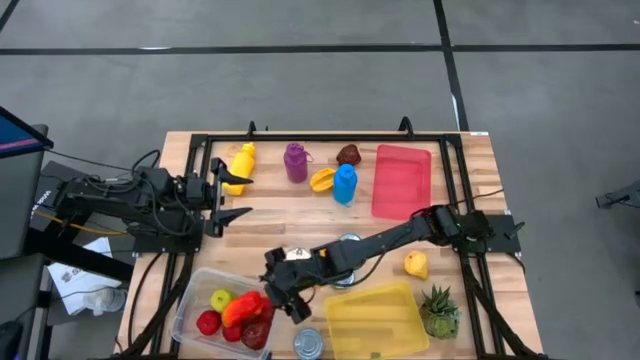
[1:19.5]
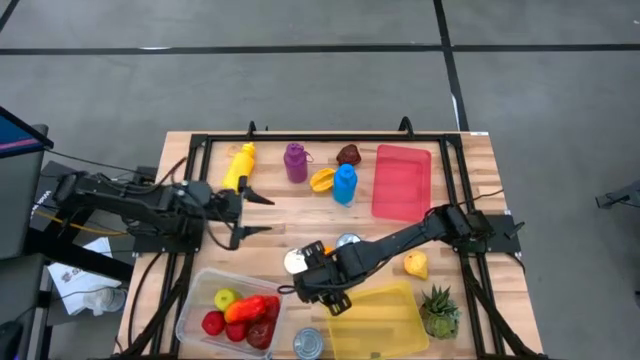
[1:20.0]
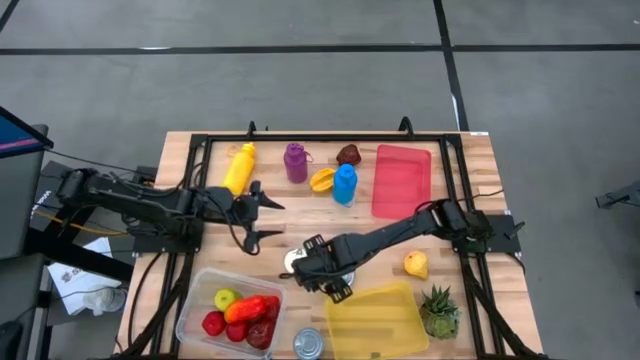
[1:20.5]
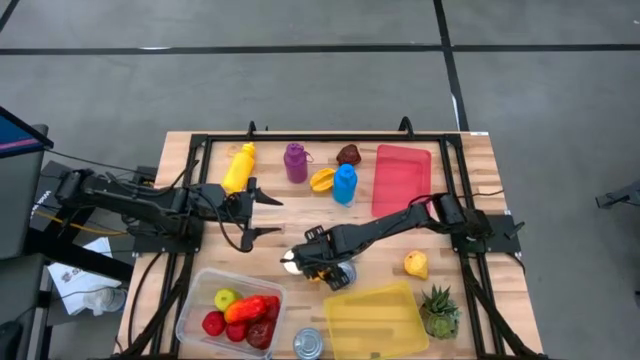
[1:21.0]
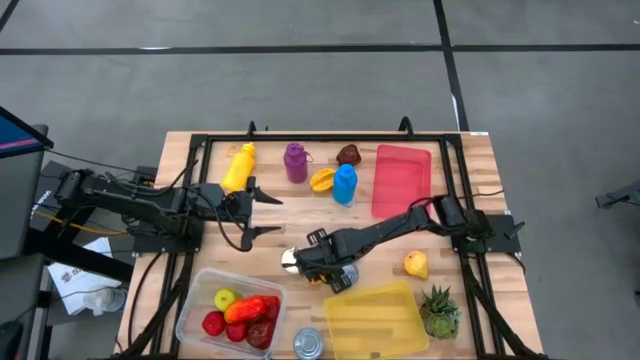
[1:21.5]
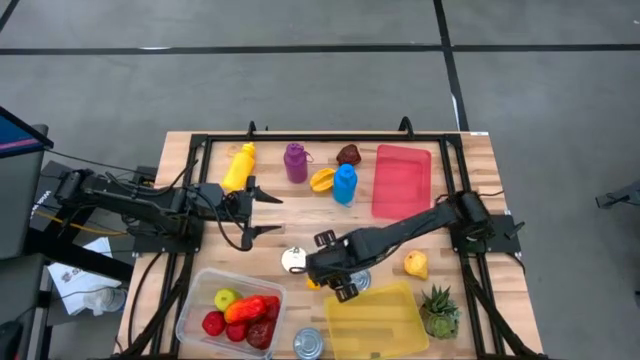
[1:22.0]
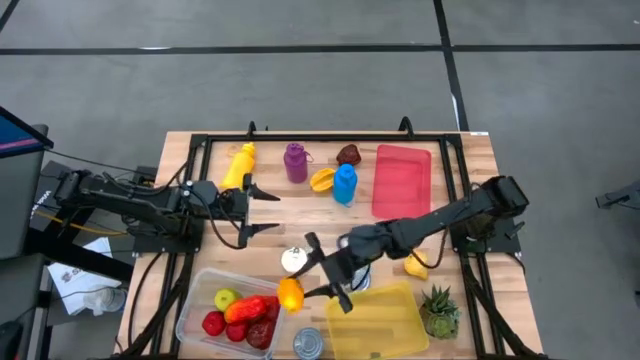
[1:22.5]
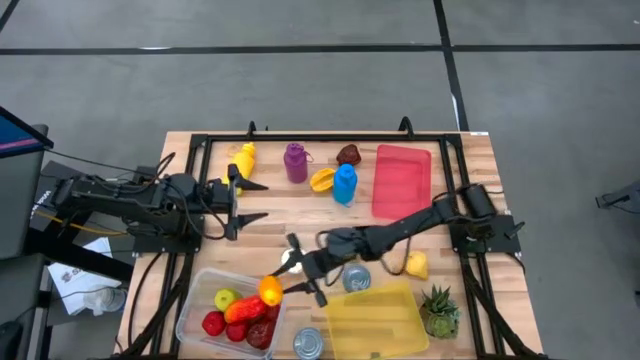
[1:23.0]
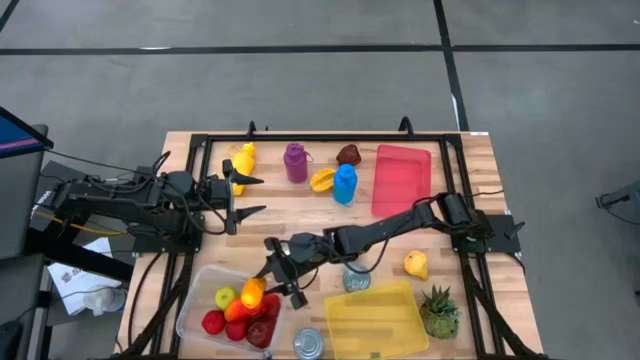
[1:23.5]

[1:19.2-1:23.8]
Task: Pick & Place Food Item
Put the yellow mango into the transparent bin

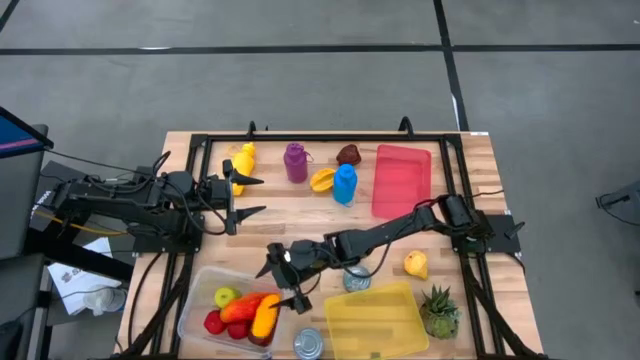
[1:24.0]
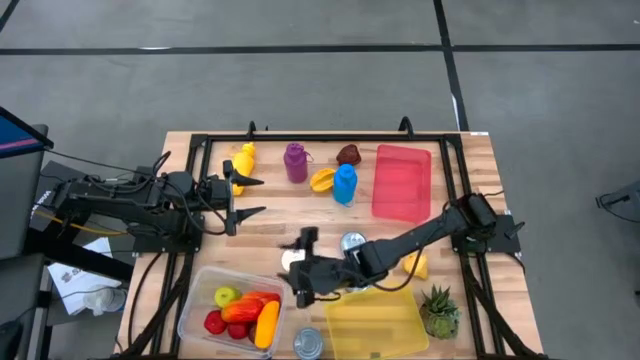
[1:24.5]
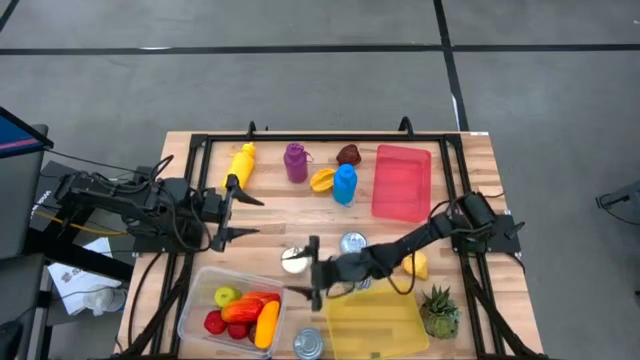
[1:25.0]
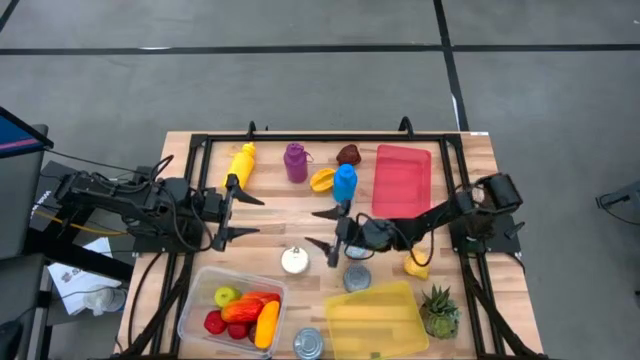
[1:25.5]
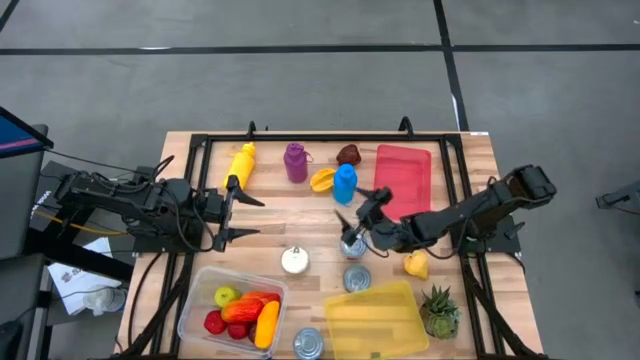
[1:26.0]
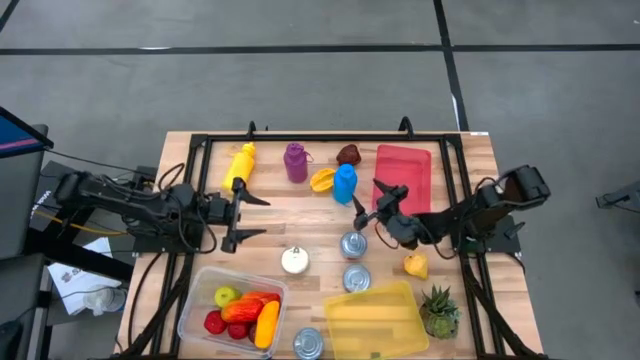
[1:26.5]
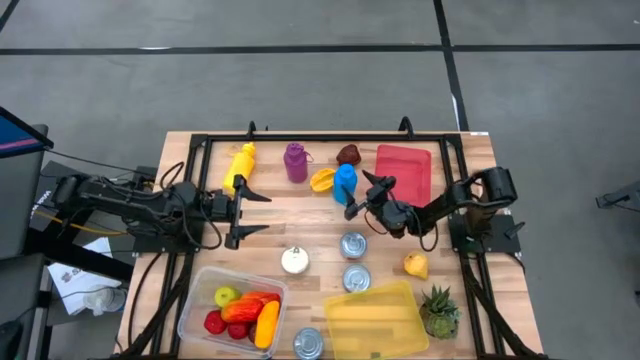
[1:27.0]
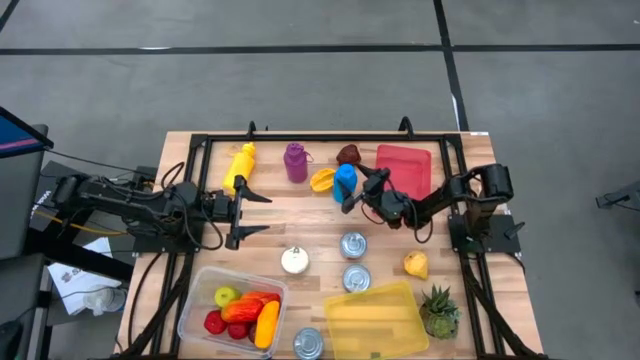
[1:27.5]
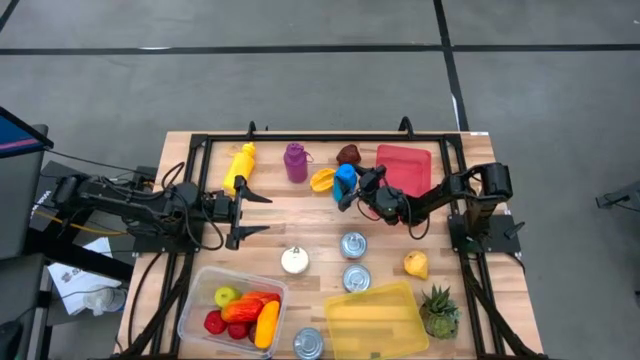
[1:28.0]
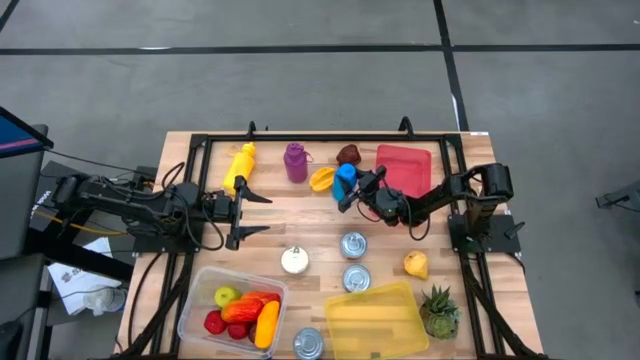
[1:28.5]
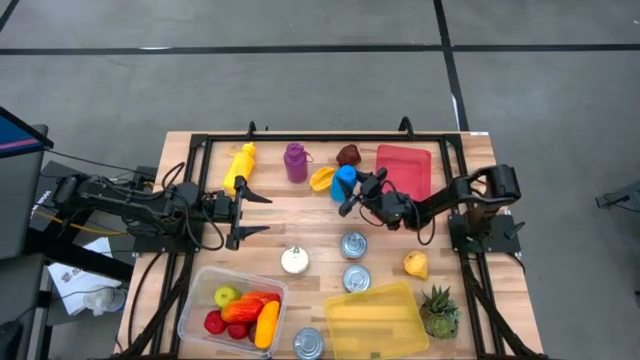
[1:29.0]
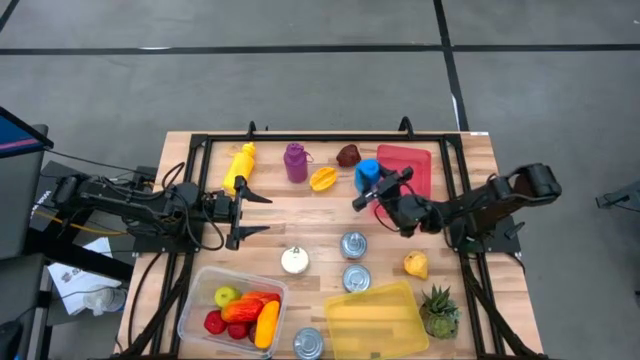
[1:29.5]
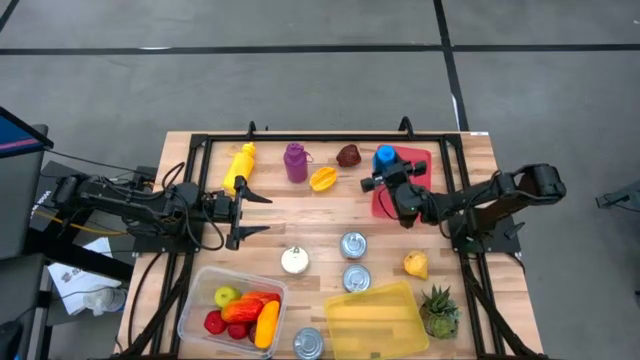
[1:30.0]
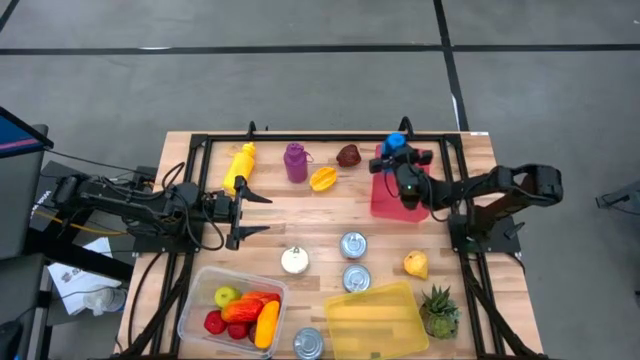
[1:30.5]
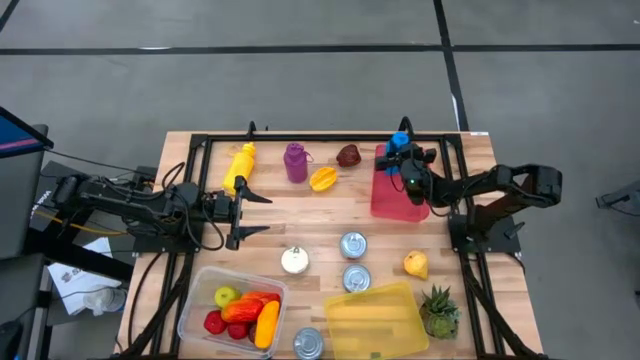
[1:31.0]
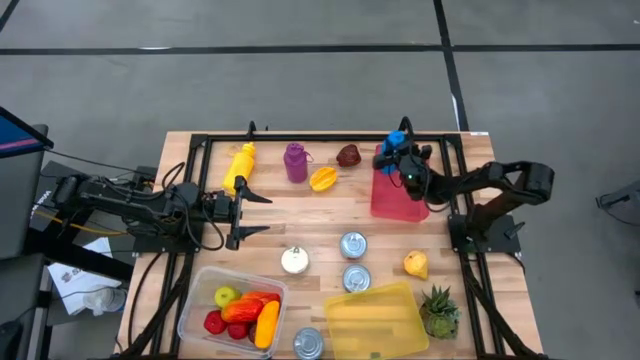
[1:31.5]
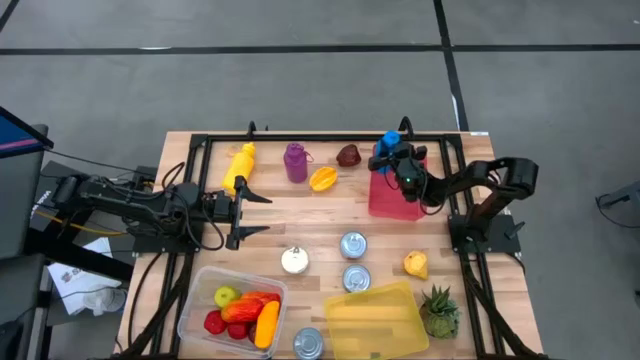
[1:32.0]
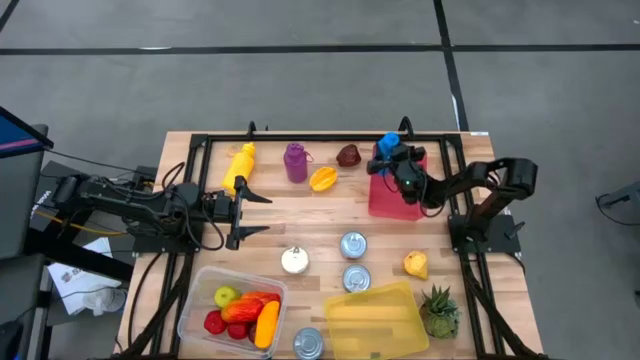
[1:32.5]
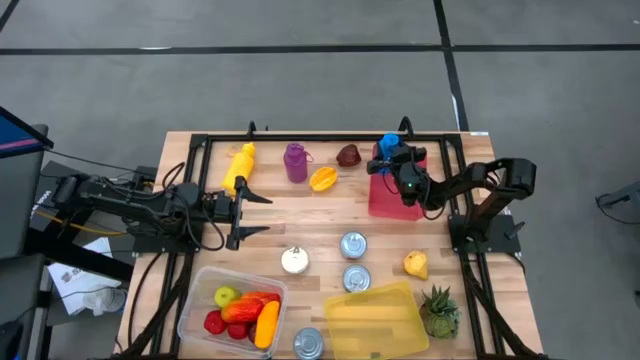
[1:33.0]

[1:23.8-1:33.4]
Put the blue water bottle into the red bin

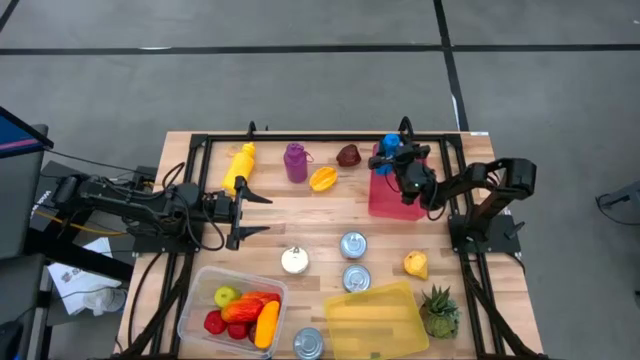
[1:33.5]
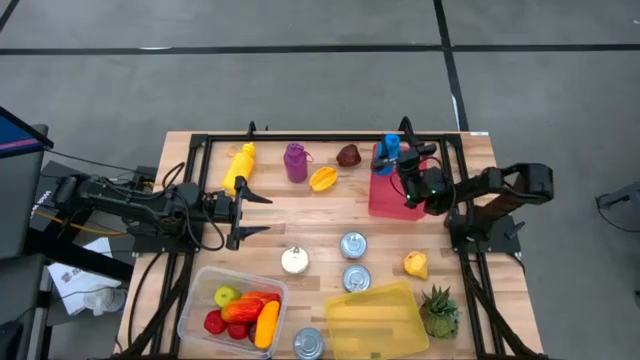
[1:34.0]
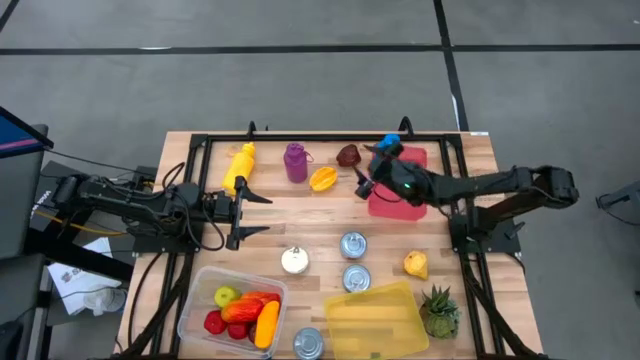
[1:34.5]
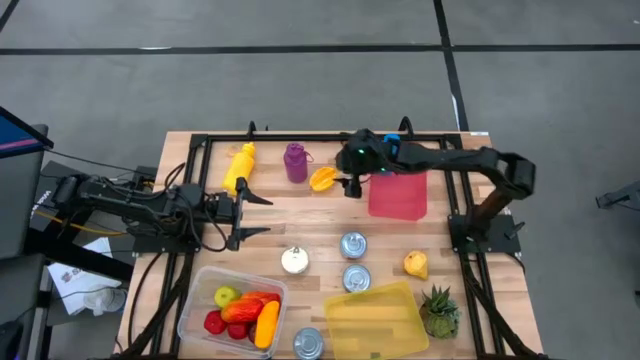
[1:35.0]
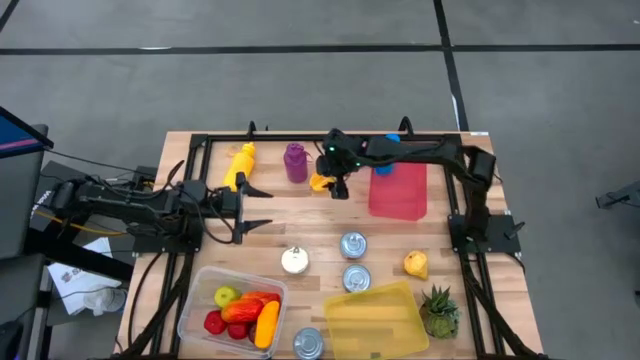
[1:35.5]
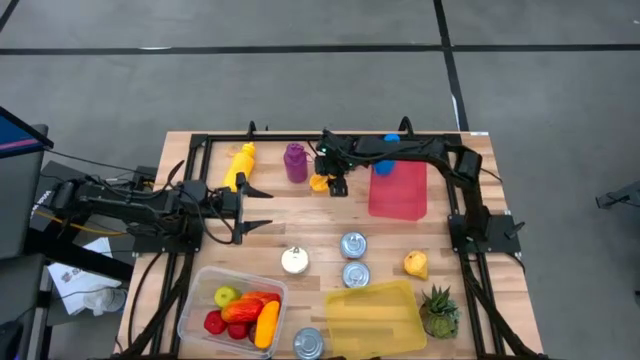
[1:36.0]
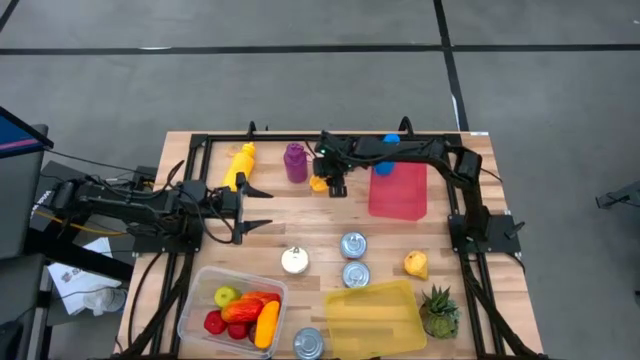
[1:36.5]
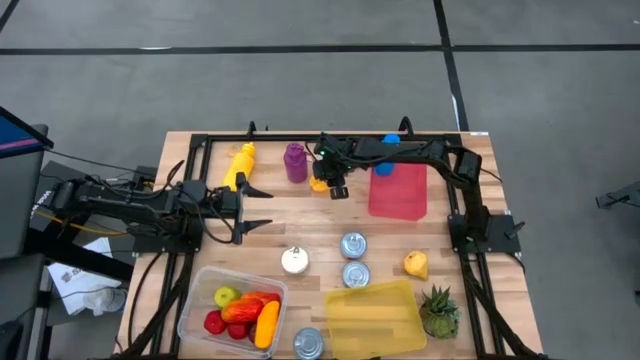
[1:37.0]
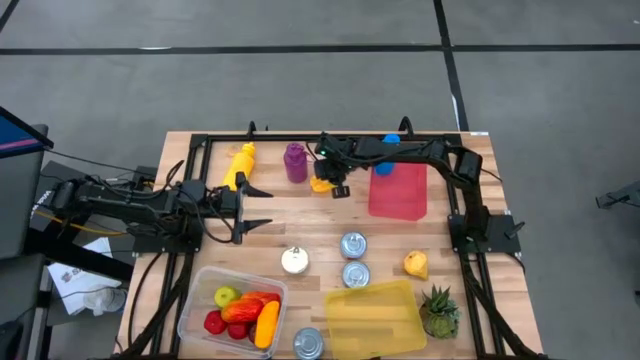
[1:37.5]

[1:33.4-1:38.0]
Put the yellow starfruit into the transparent bin

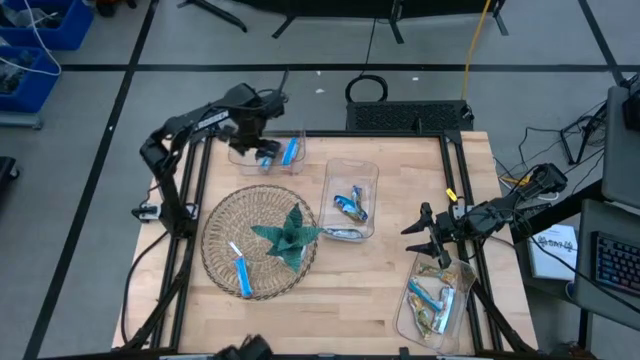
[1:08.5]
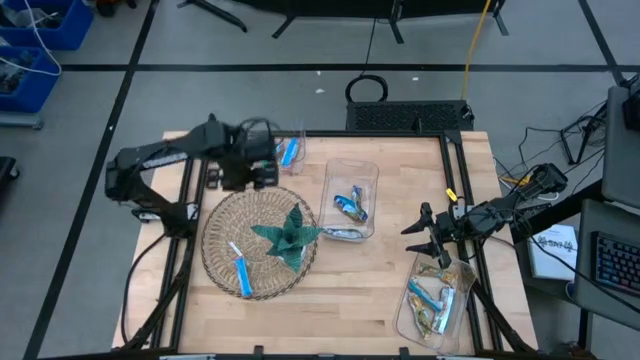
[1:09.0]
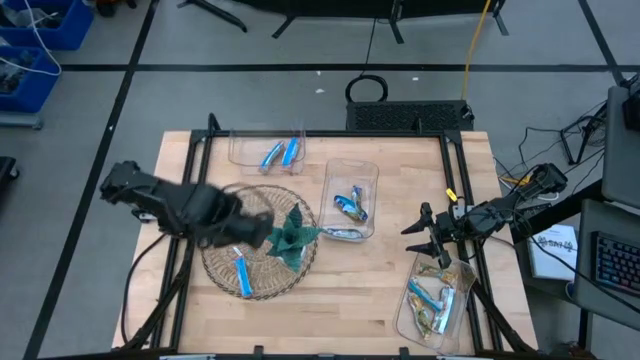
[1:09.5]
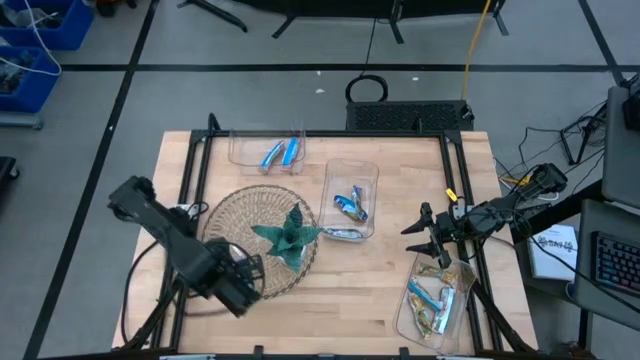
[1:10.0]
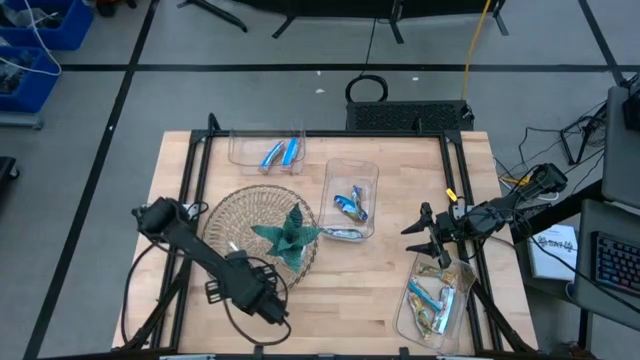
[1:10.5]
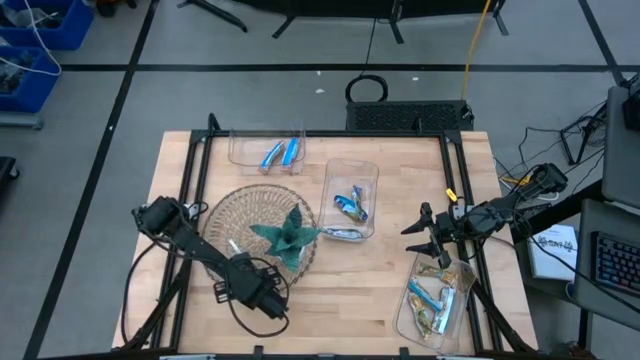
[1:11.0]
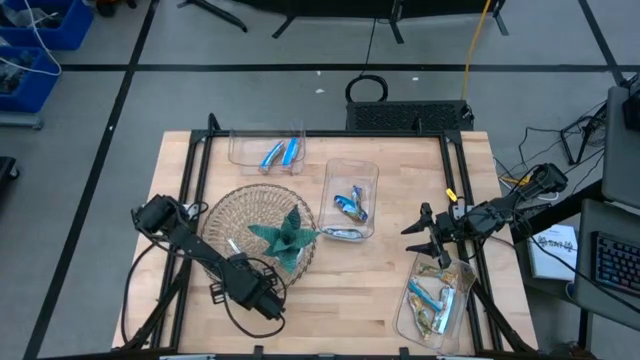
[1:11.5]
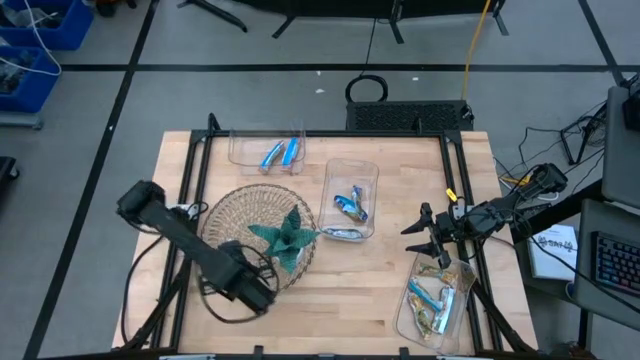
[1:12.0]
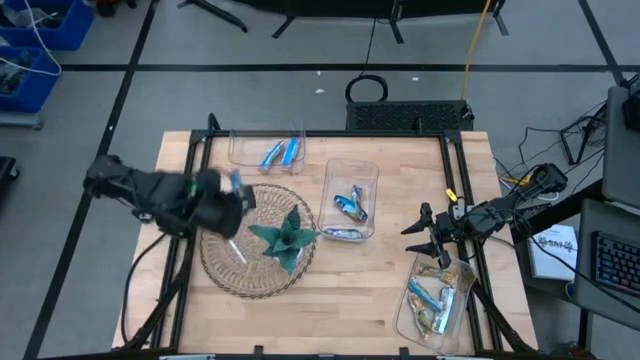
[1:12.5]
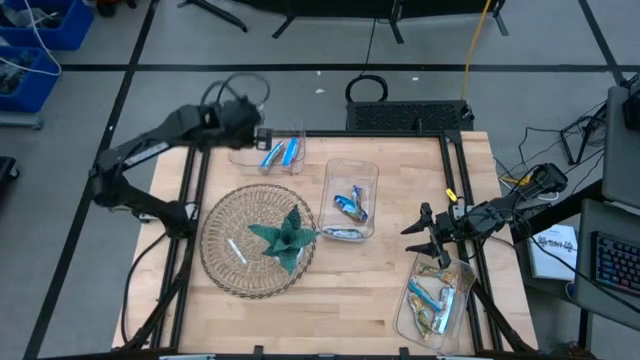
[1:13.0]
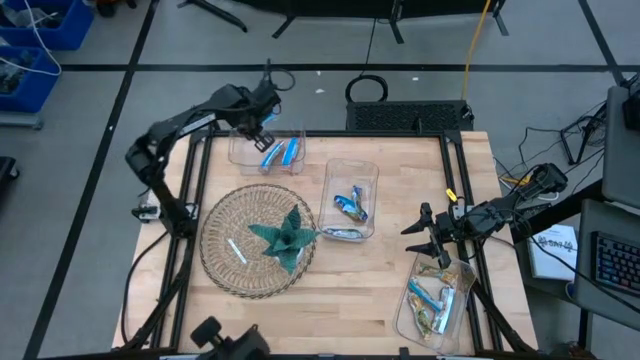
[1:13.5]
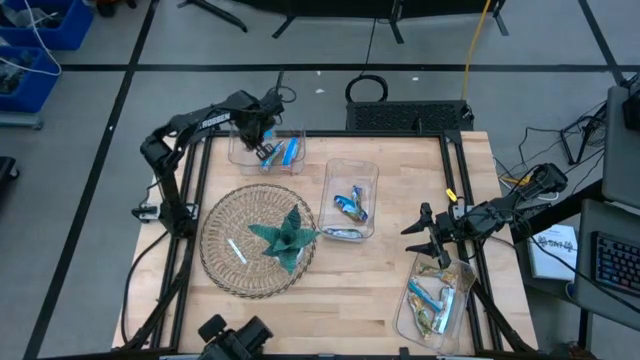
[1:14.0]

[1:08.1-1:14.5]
Task: Pick and place Granola Bars by type
Put the red granola bar into the top transparent bin
